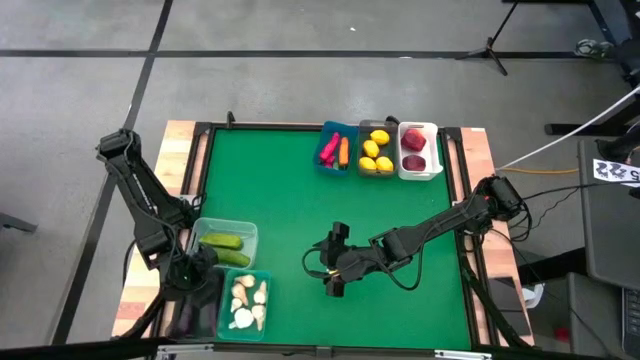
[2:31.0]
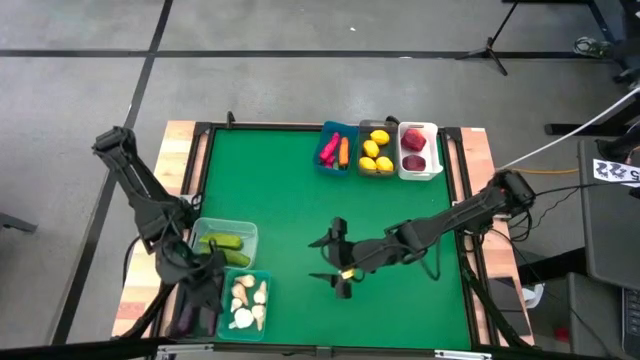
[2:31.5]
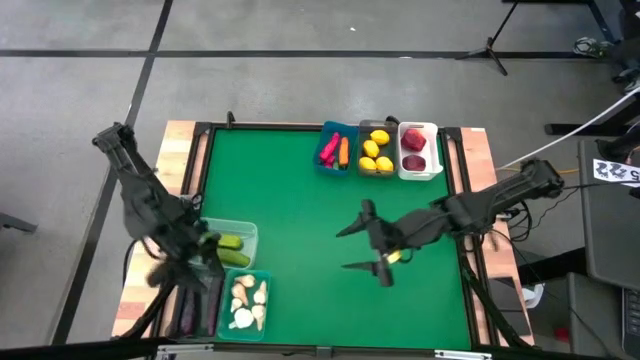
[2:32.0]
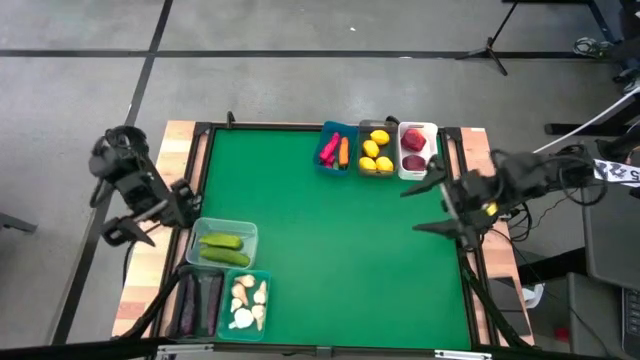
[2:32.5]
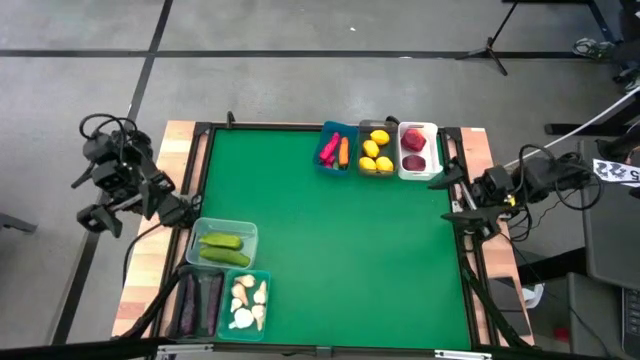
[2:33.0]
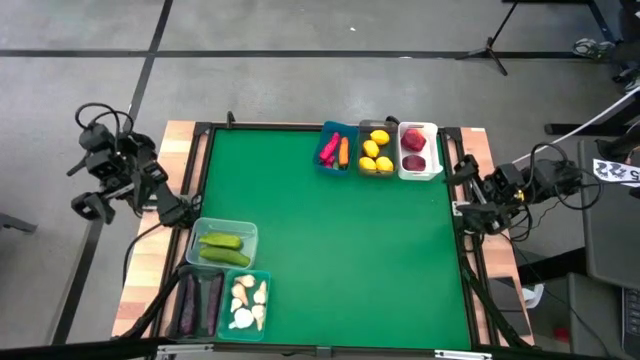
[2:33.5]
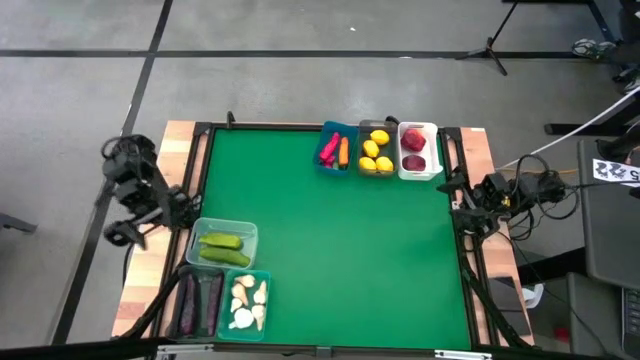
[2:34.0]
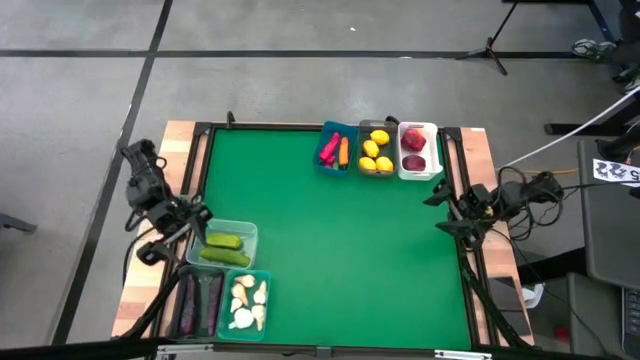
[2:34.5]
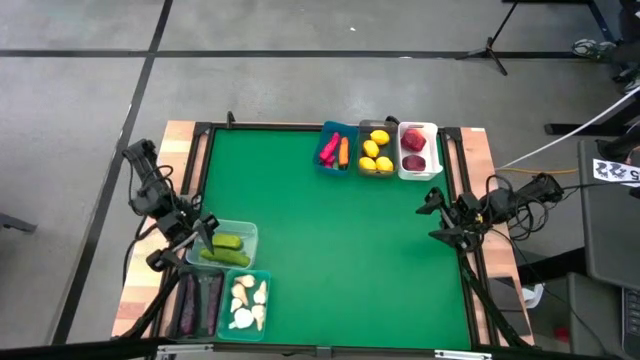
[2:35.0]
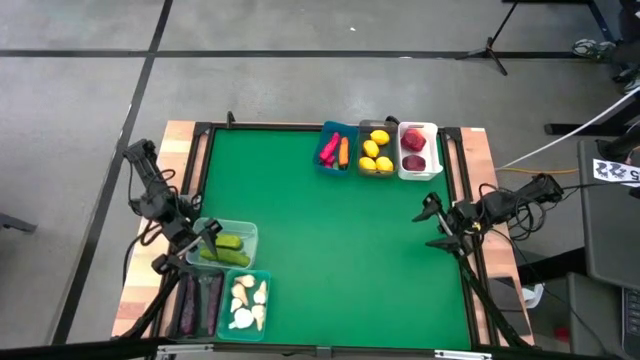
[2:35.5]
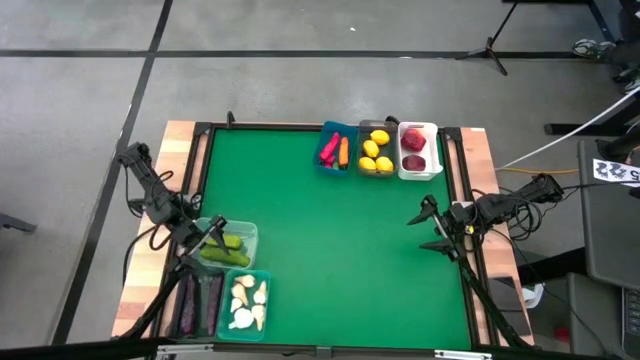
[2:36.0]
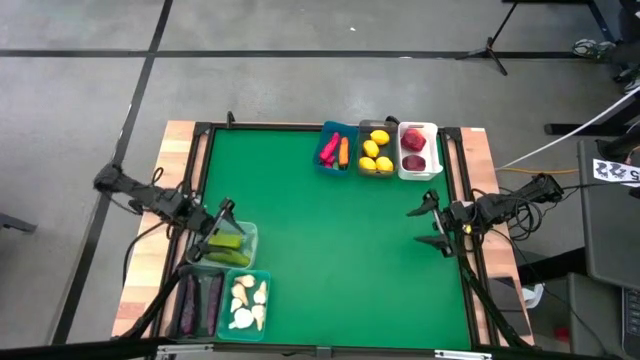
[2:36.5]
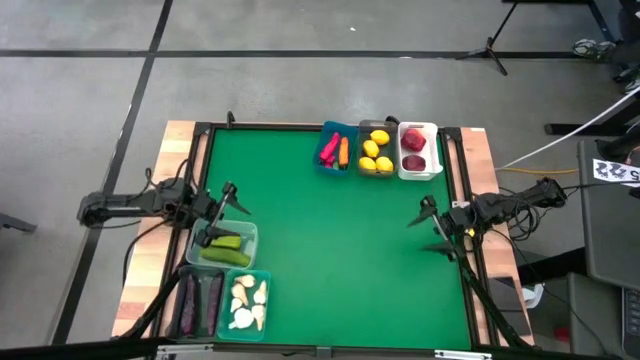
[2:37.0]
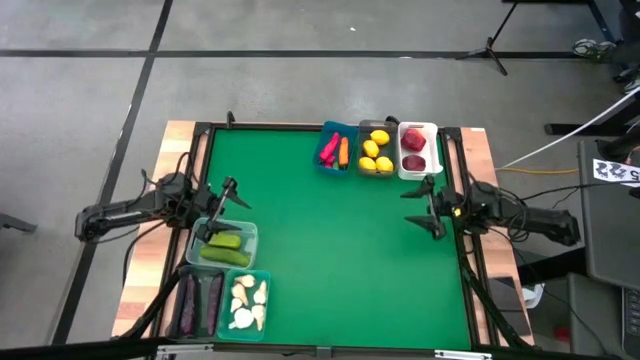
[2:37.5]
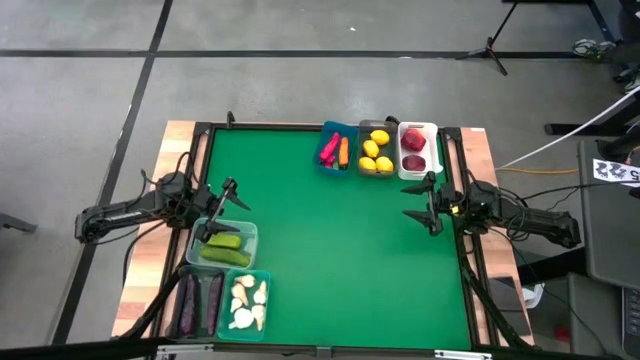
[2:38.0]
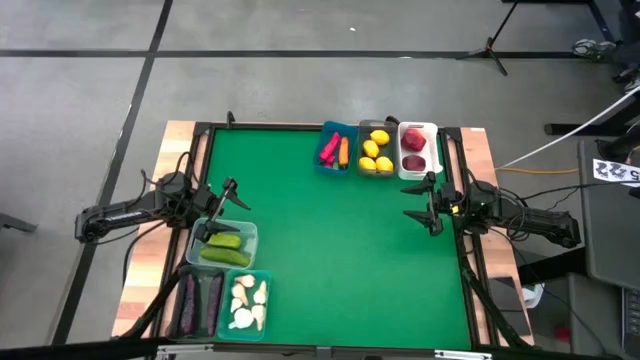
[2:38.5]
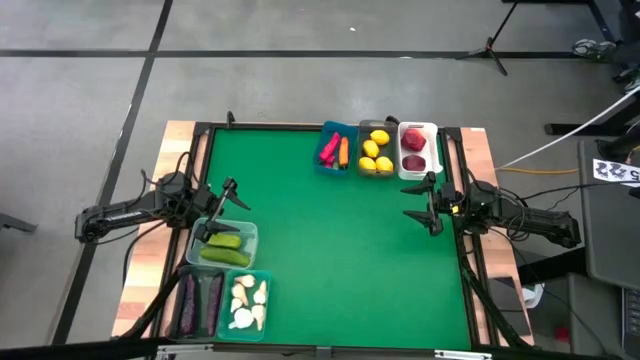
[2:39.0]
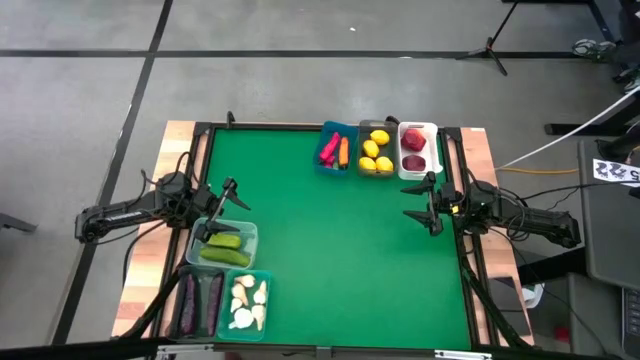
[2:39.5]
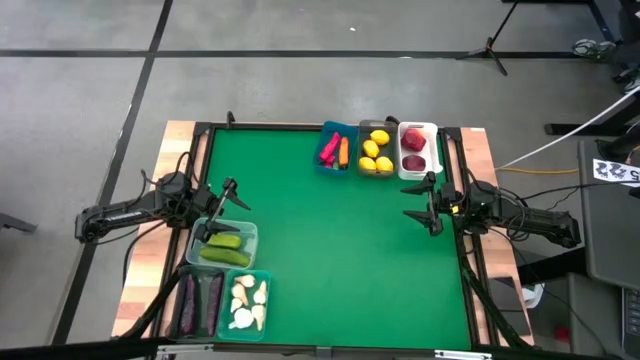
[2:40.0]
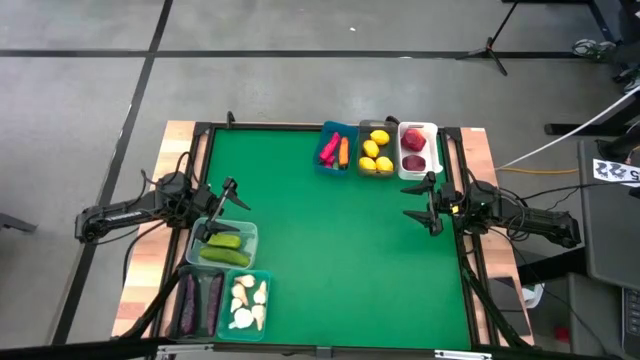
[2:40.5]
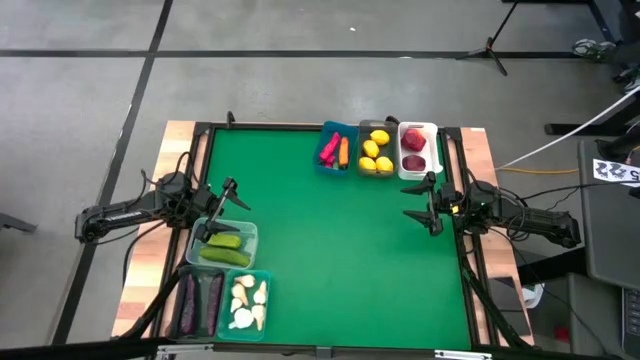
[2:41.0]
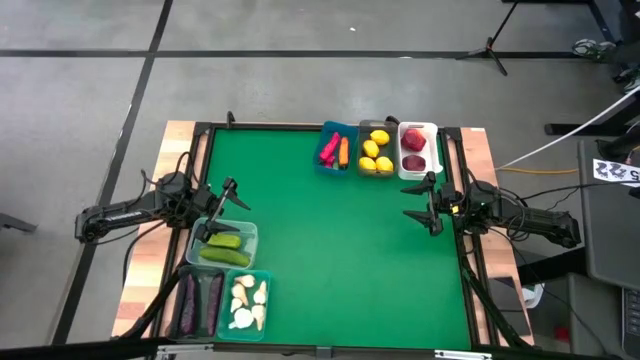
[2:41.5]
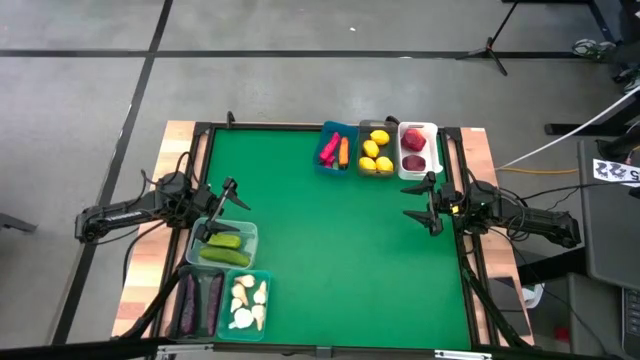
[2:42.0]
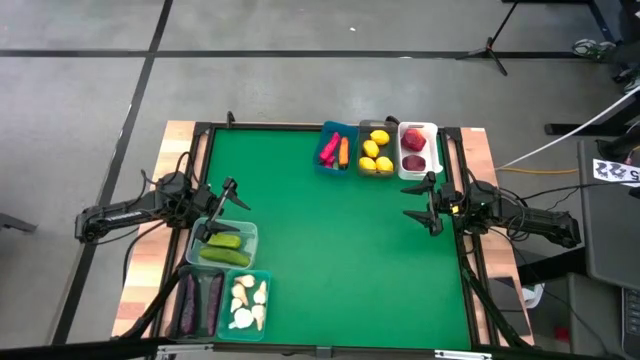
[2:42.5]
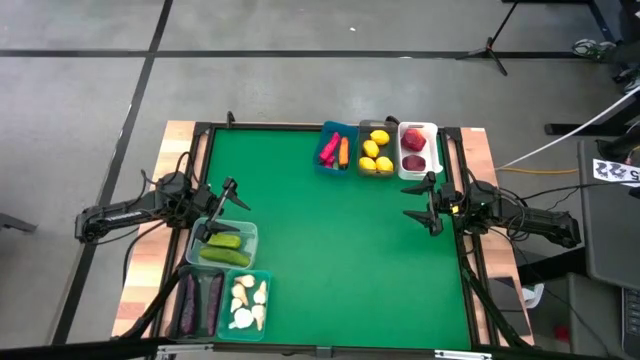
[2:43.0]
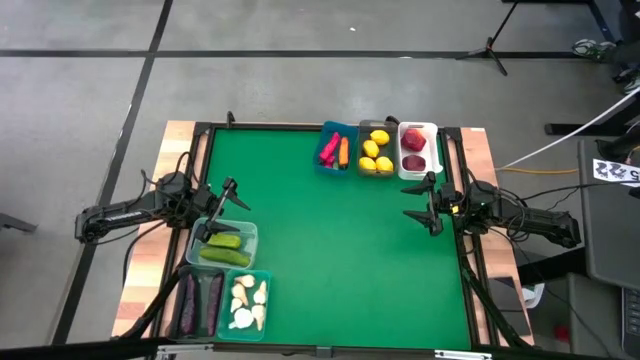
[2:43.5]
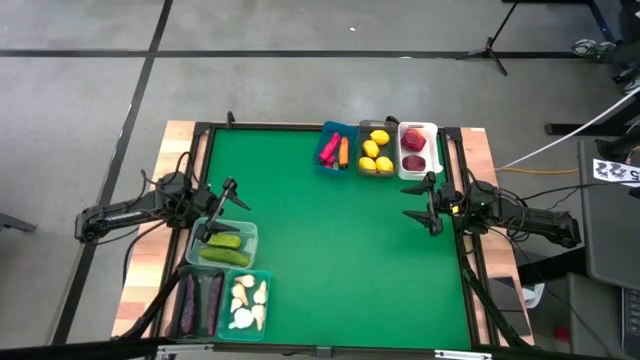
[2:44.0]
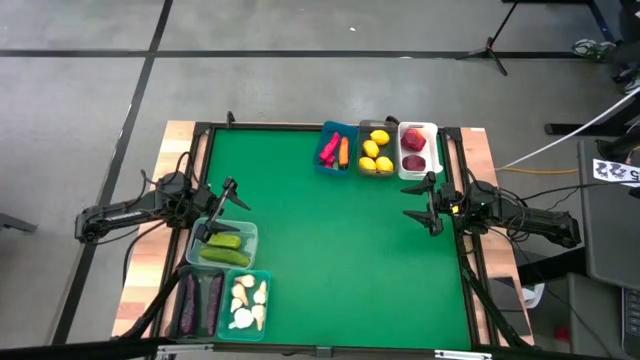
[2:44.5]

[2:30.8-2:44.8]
Task: Sort produce into baskets
Return to Home Position

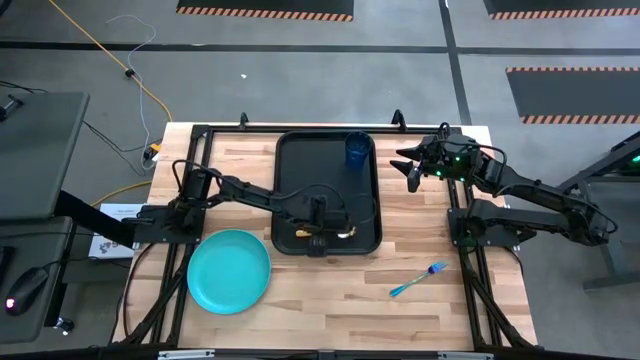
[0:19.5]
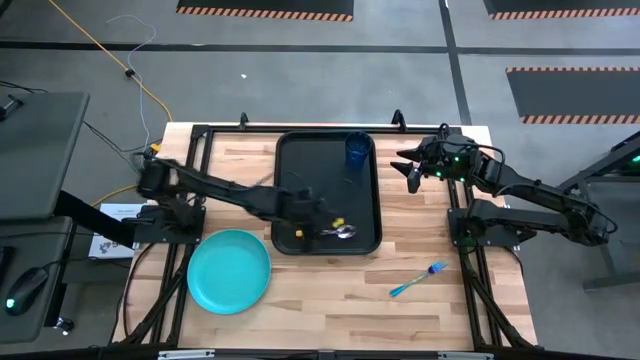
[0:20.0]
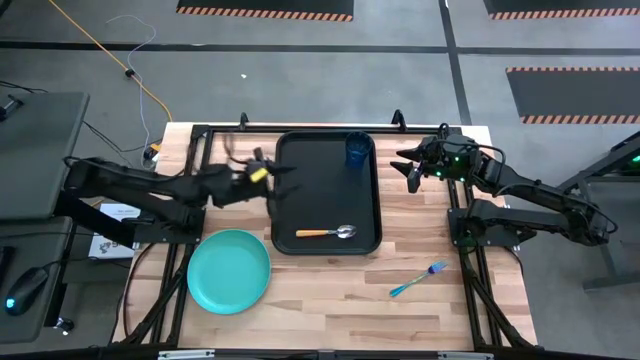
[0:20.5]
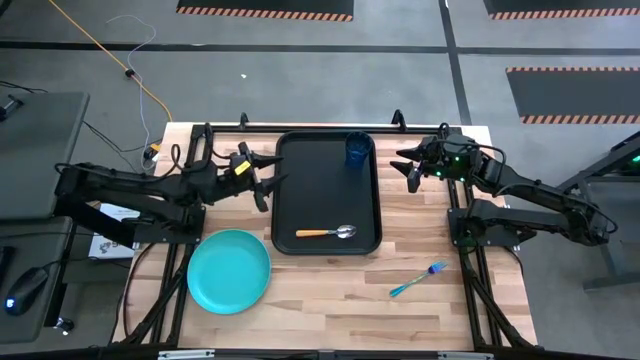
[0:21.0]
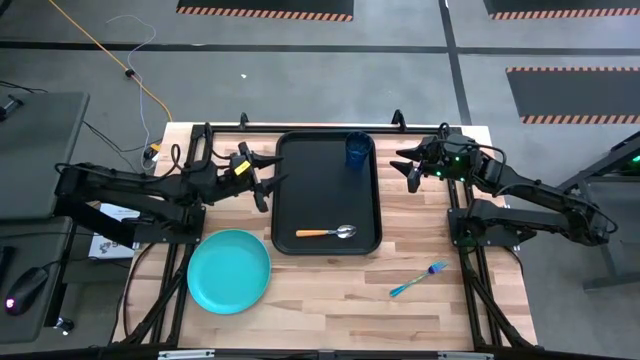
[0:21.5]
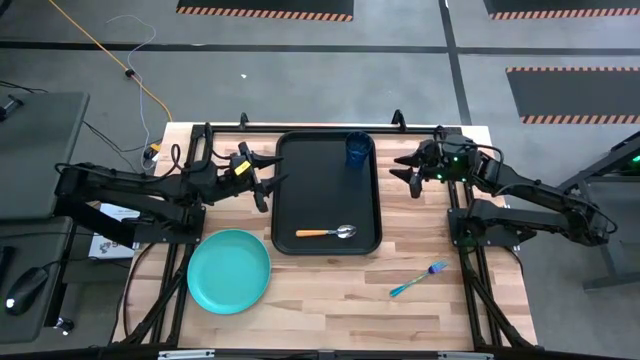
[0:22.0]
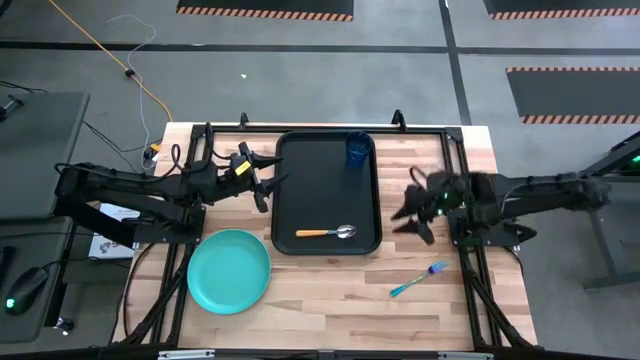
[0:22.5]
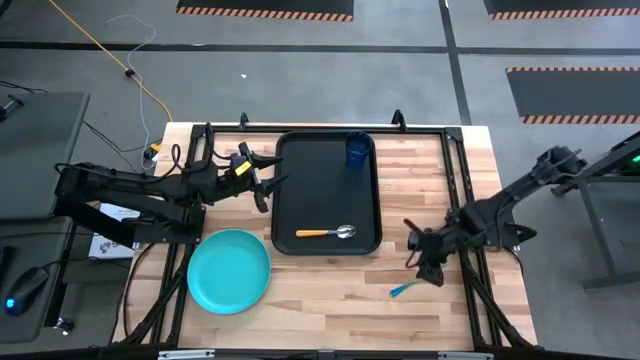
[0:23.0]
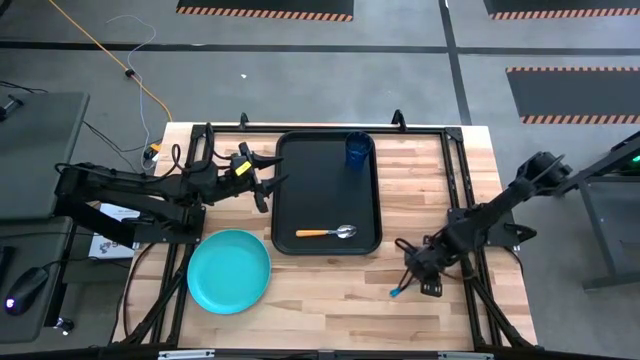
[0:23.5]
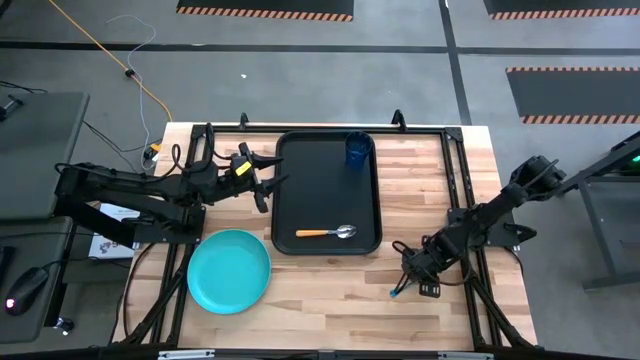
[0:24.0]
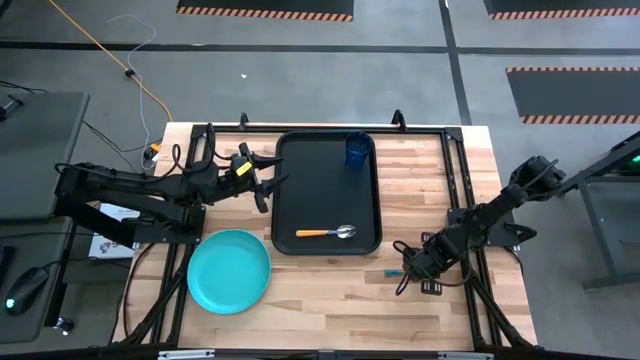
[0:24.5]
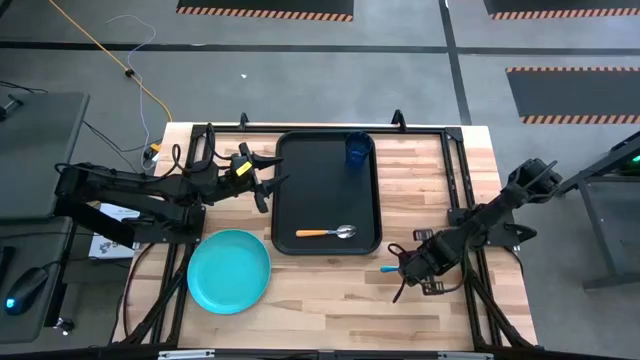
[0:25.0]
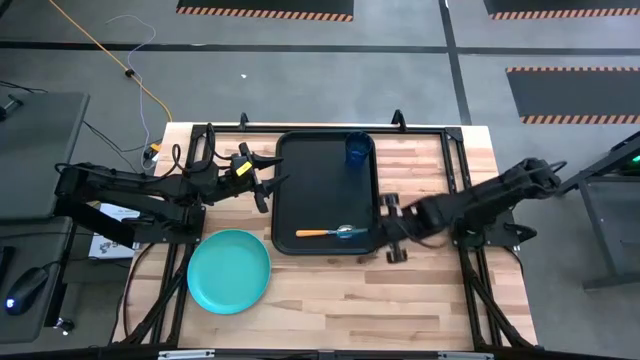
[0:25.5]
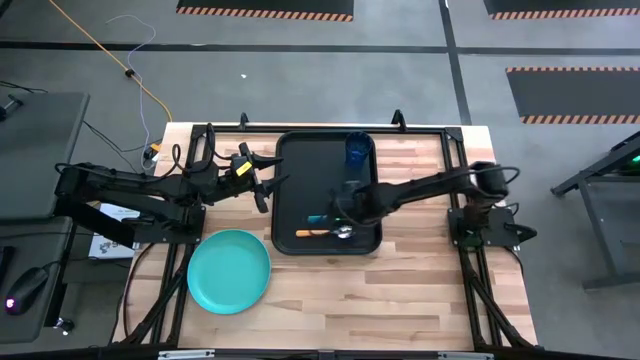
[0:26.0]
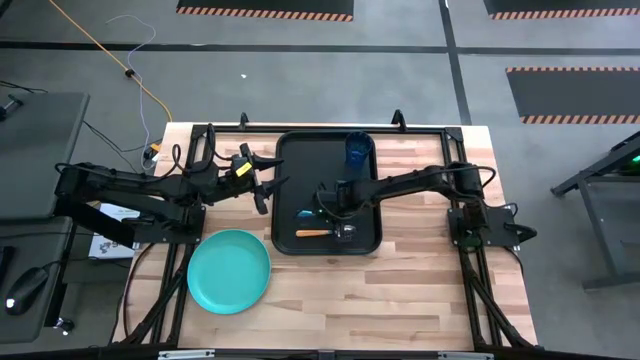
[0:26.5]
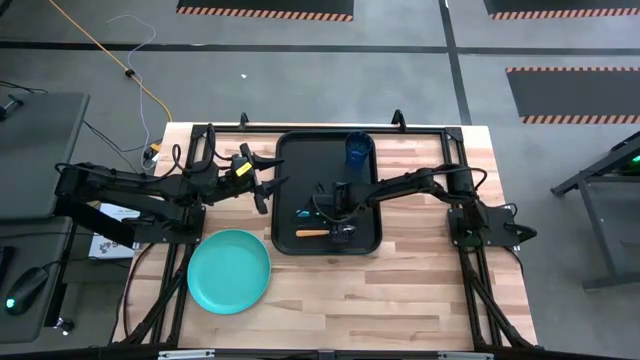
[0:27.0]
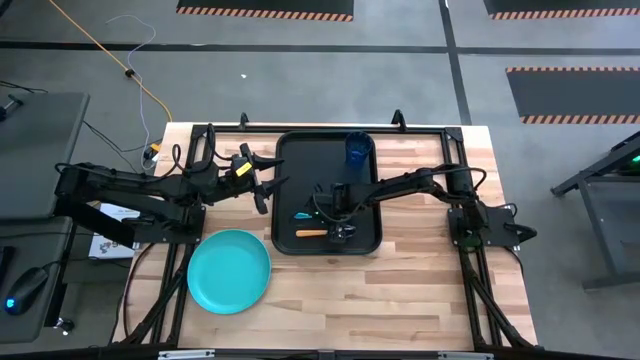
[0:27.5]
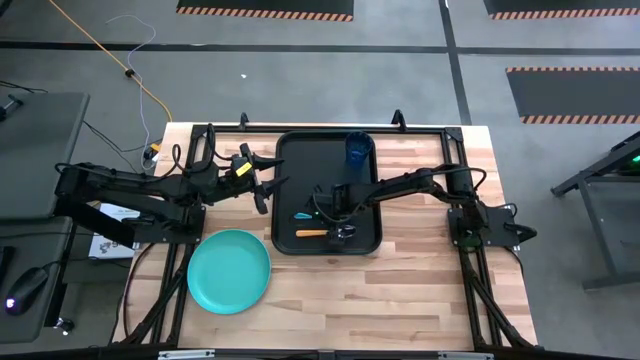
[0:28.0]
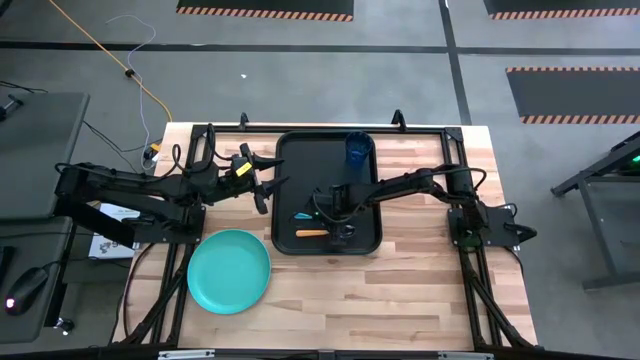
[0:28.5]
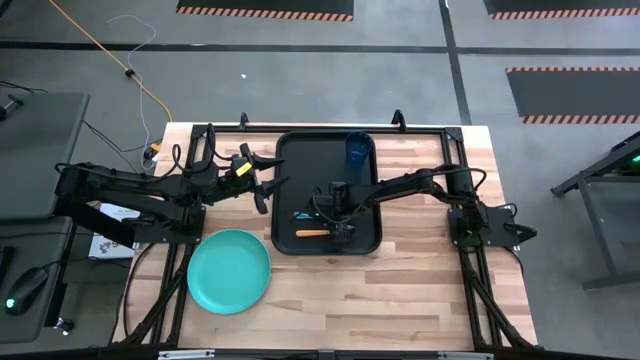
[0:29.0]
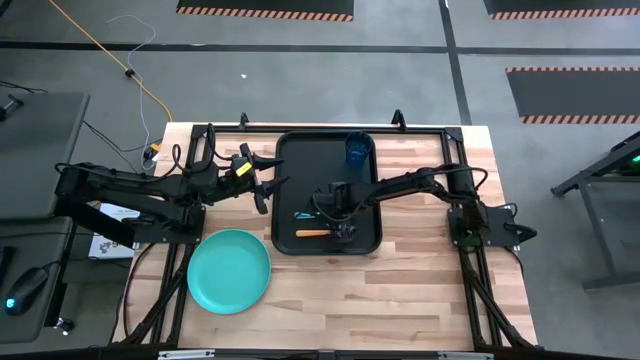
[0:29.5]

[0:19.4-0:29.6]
Task: Pick and place plate/cup/fork/spoon on tray
Put the blue fork on the black tray above the yellow spoon
